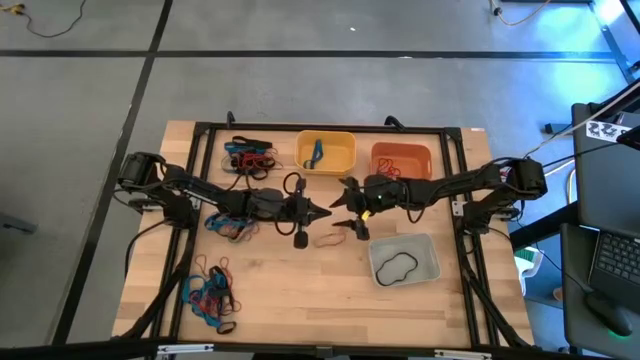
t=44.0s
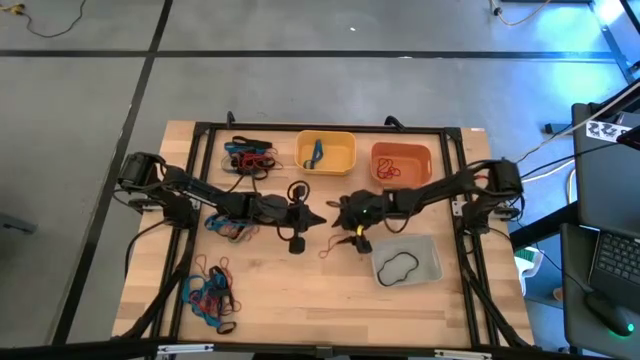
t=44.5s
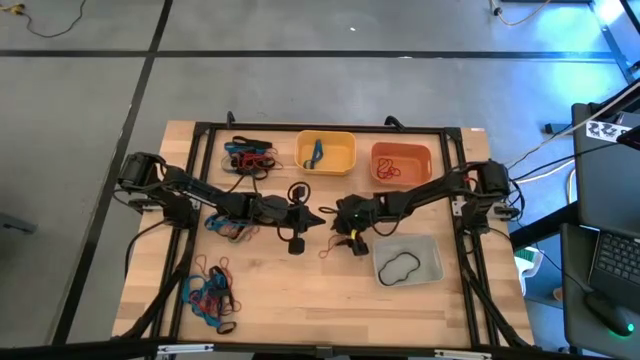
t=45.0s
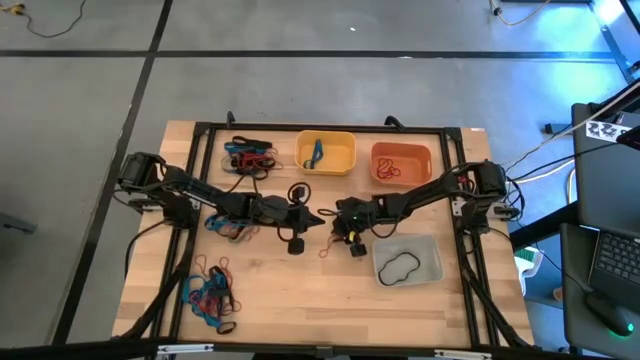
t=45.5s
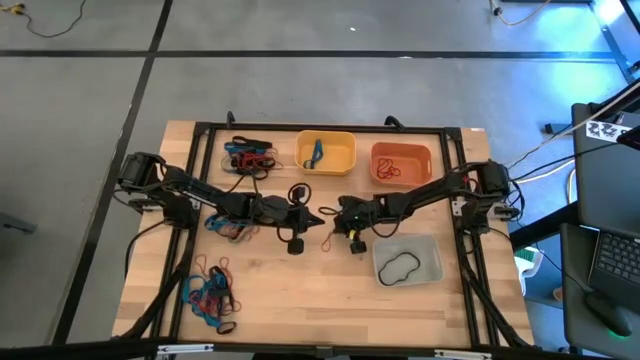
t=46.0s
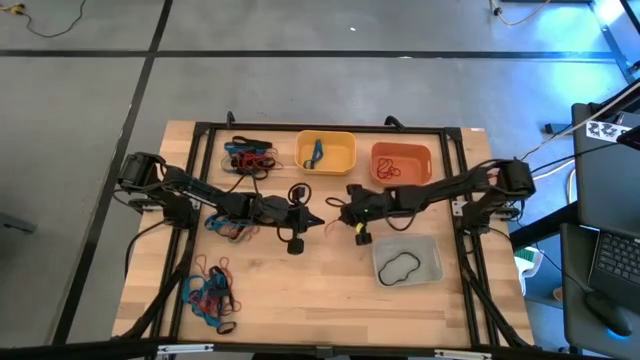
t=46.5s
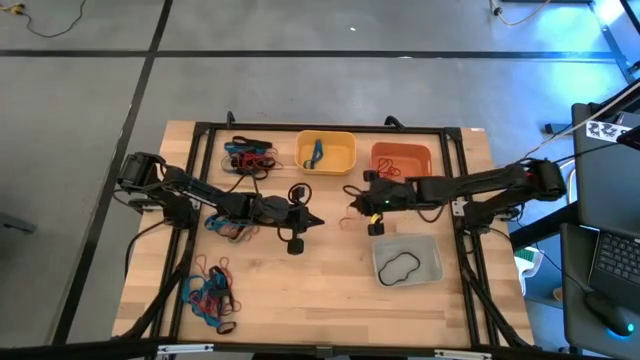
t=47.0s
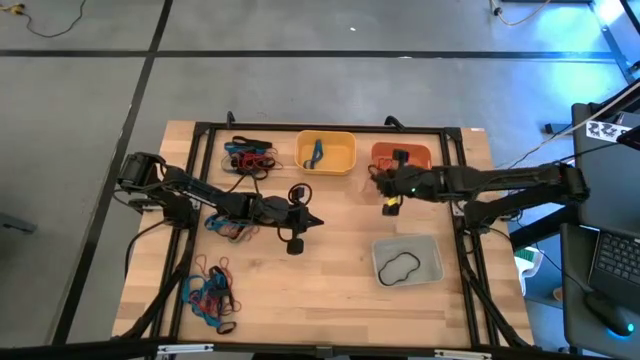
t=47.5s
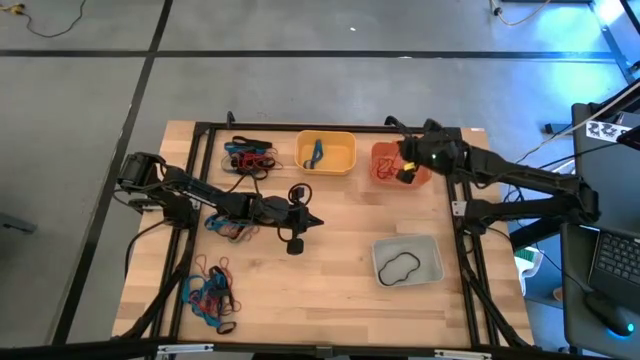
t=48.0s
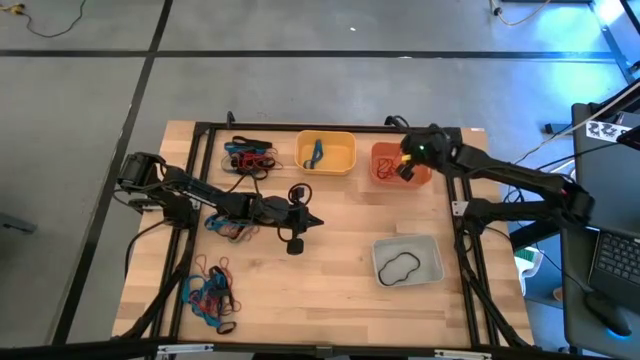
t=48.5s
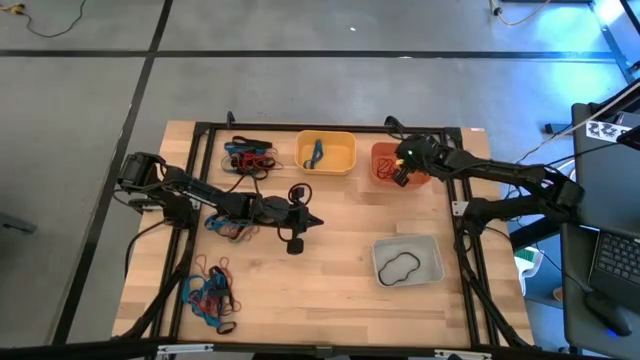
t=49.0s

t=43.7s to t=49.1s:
Task: Sort rubber bands into baskets
Put the red rubber band into the orange bin

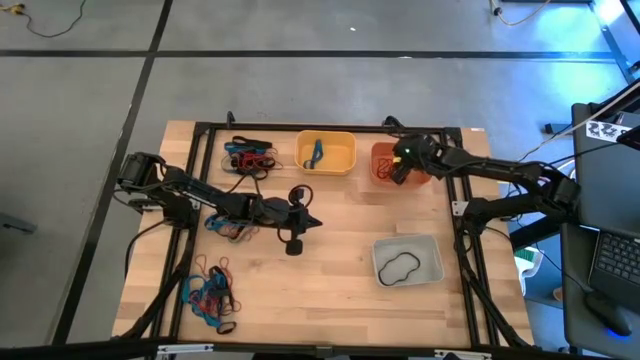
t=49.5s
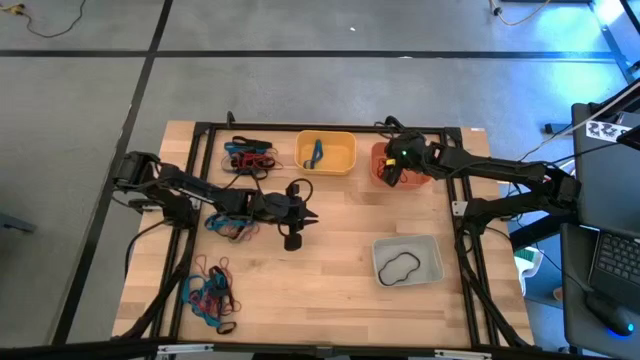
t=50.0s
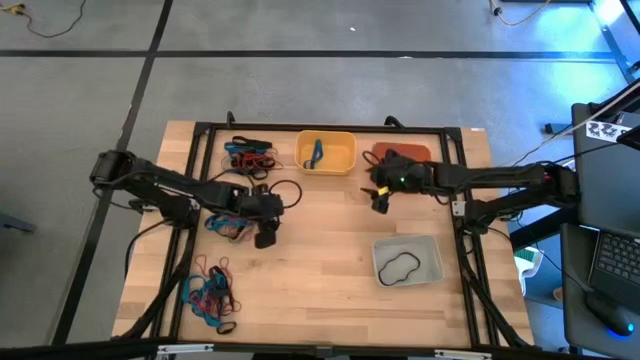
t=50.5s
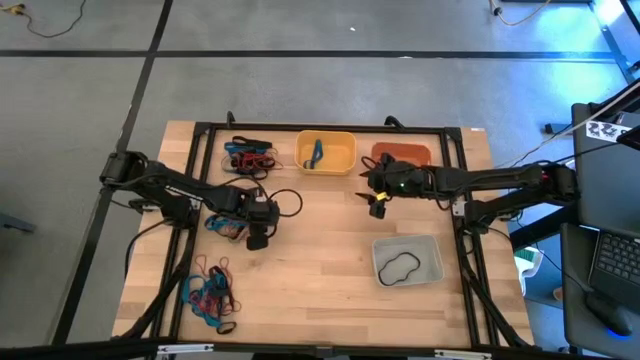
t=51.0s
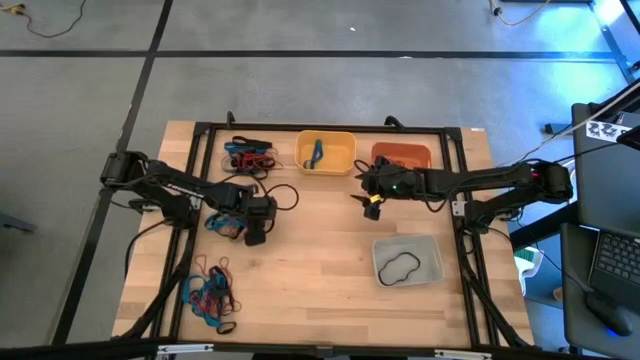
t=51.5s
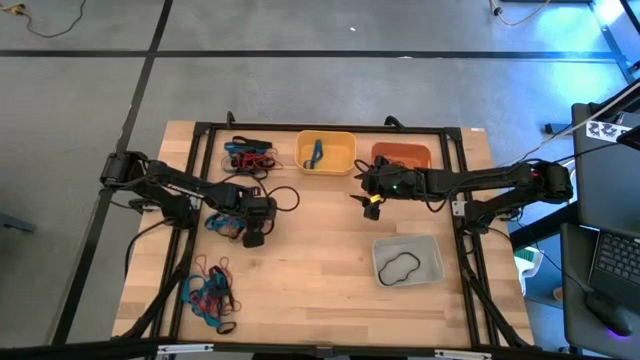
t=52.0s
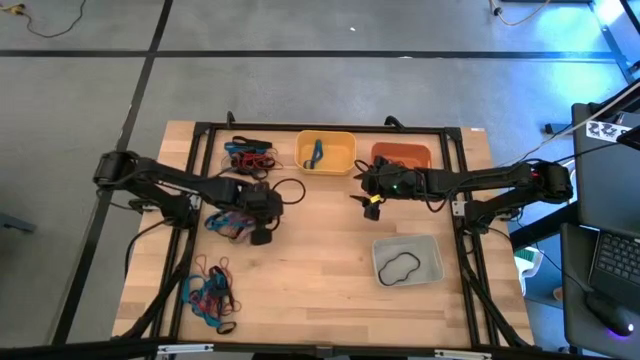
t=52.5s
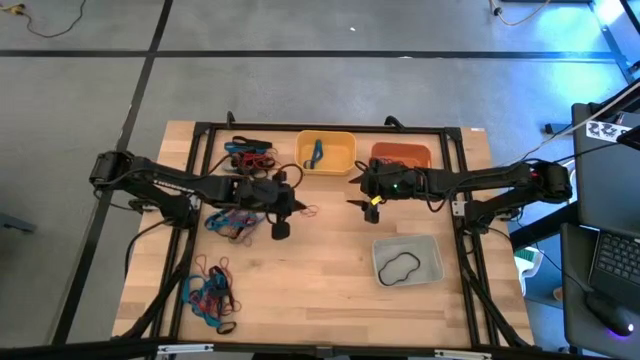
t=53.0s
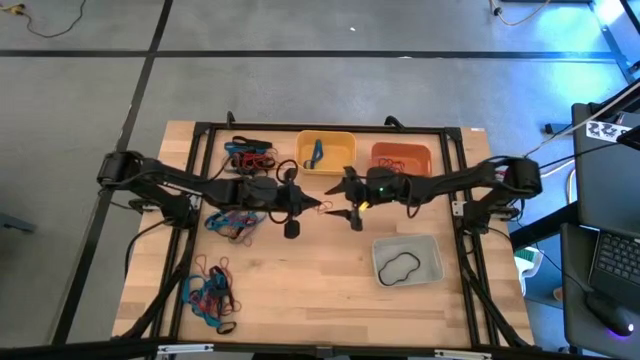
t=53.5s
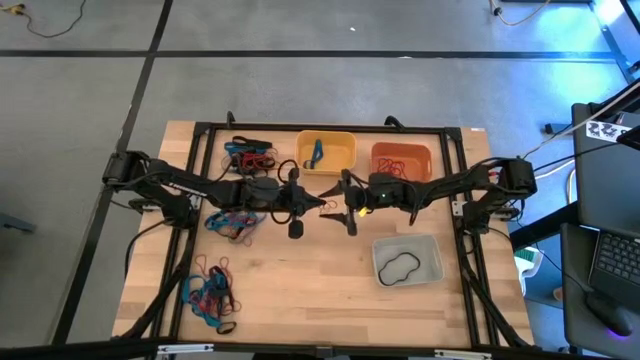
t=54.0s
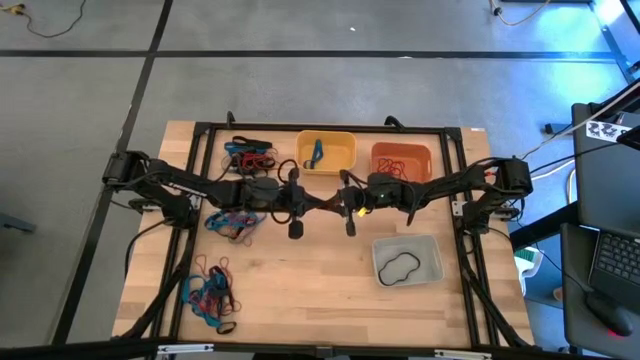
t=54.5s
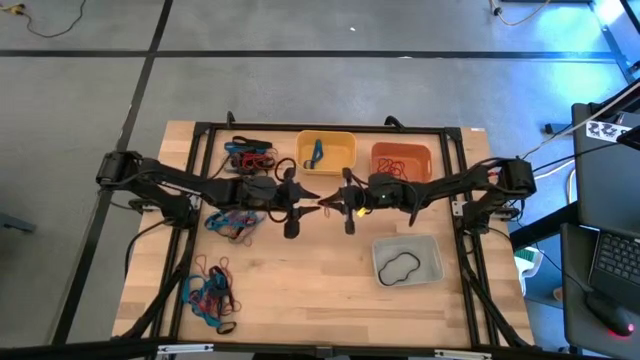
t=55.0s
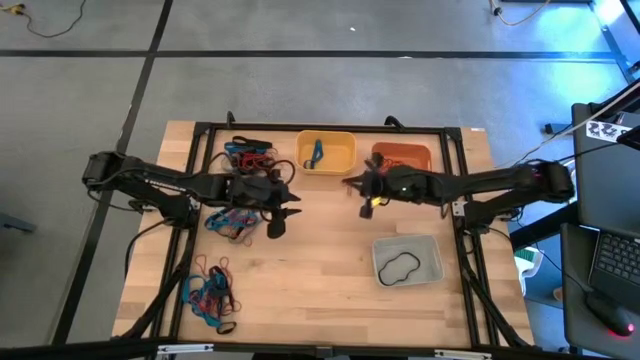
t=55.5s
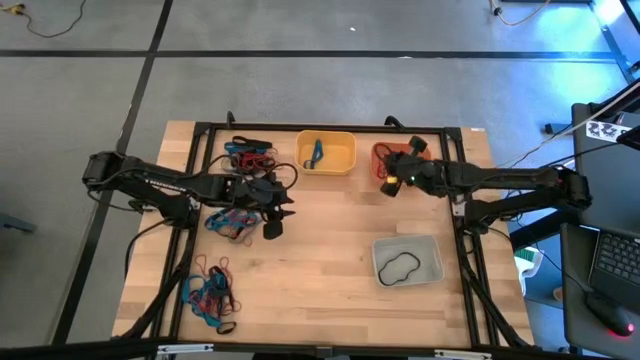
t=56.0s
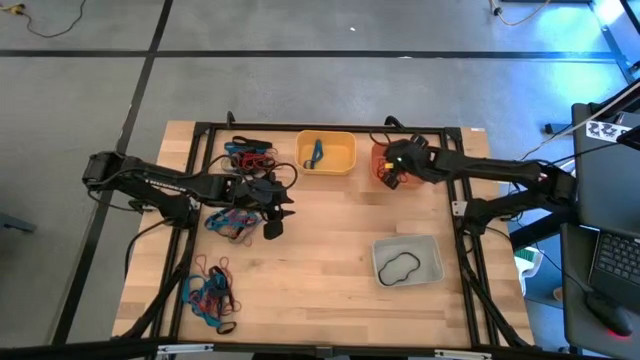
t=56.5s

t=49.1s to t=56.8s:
Put the red rubber band into the orange bin

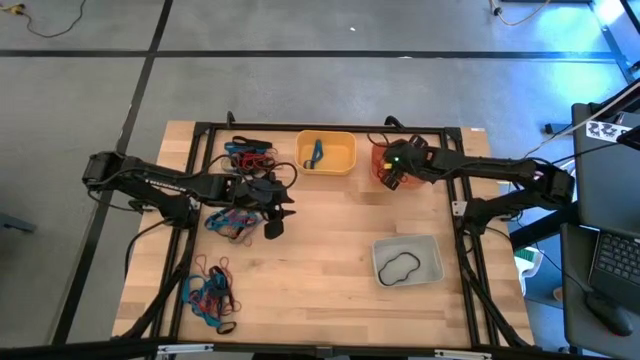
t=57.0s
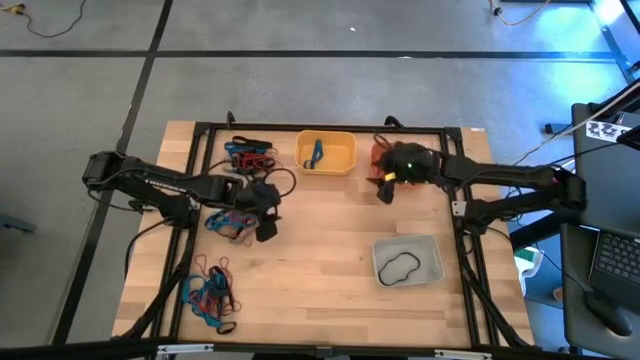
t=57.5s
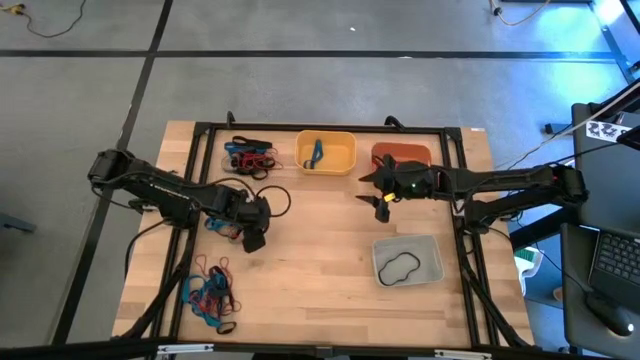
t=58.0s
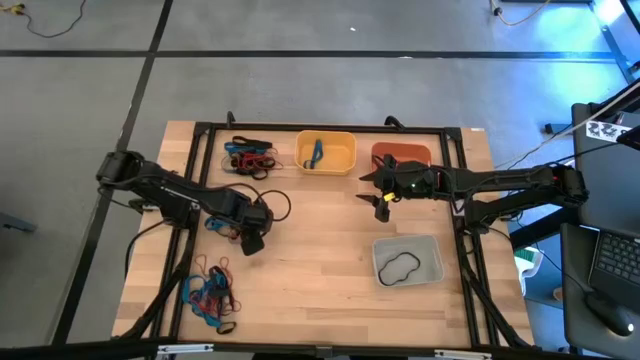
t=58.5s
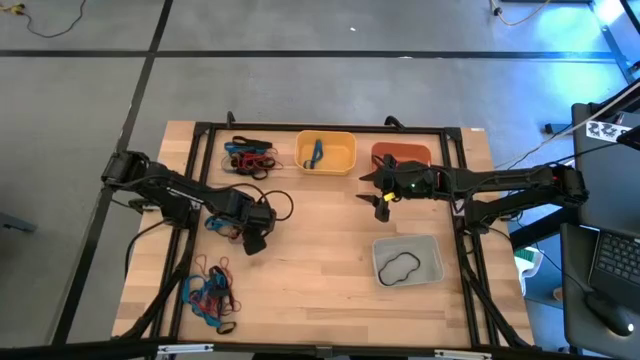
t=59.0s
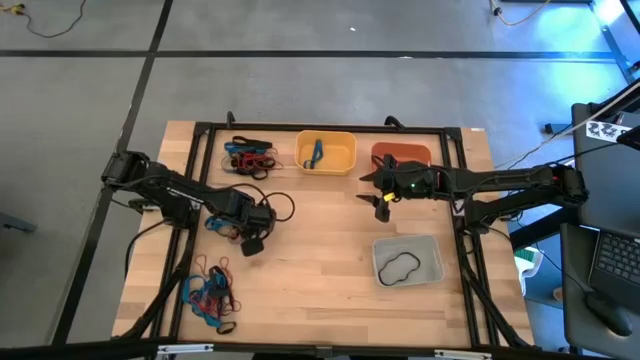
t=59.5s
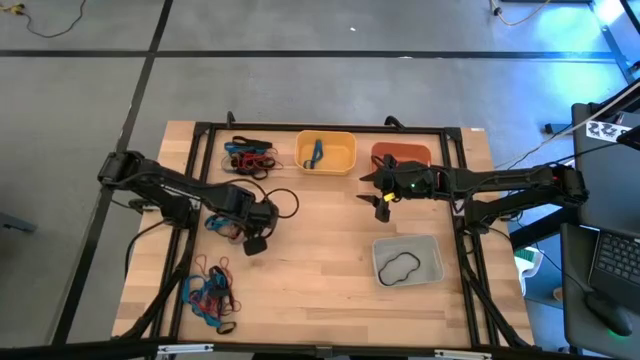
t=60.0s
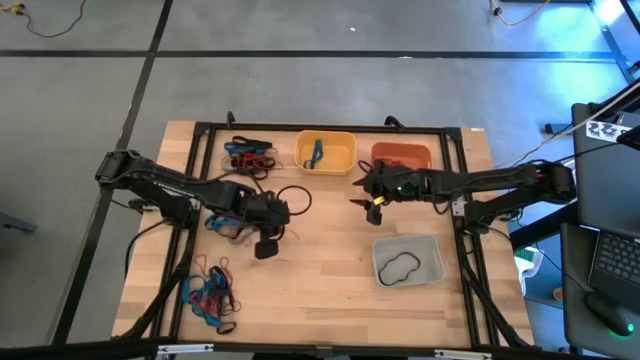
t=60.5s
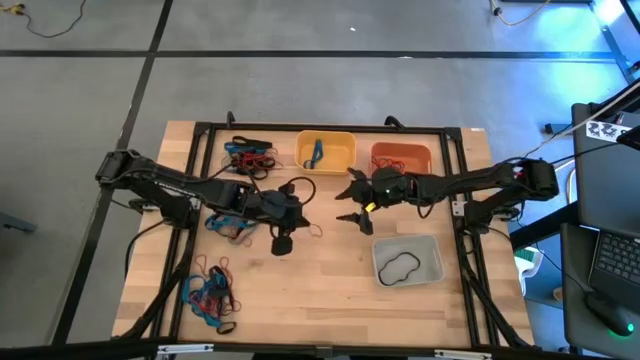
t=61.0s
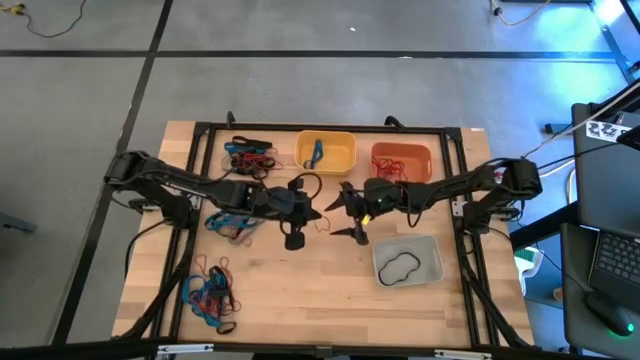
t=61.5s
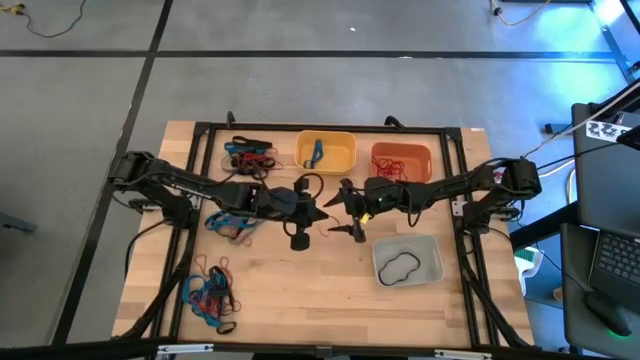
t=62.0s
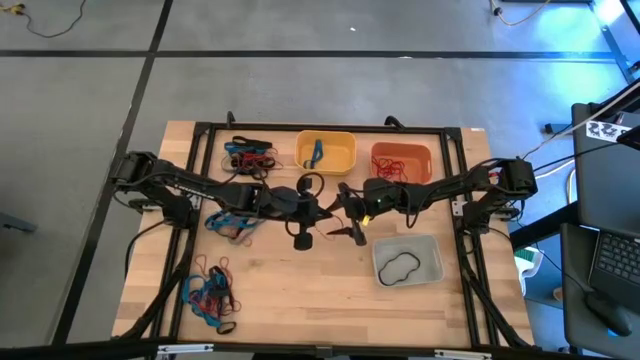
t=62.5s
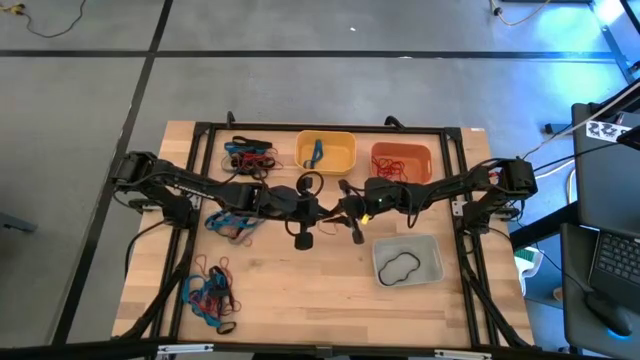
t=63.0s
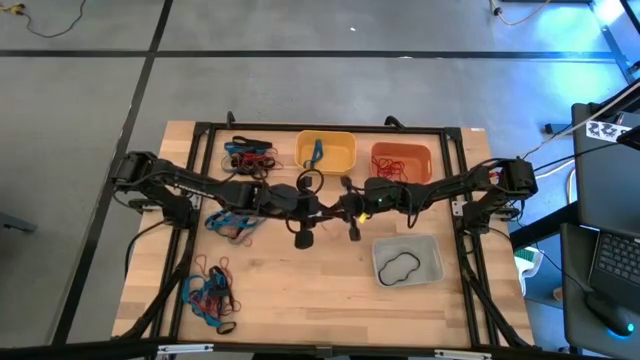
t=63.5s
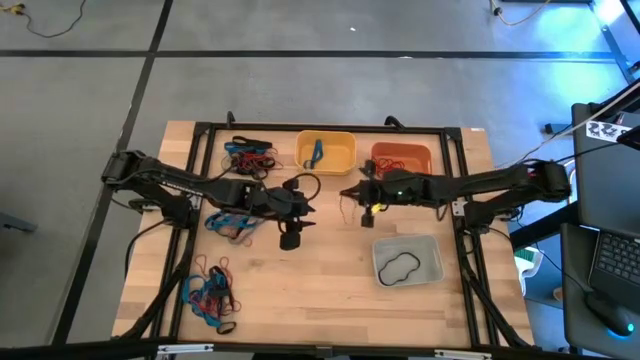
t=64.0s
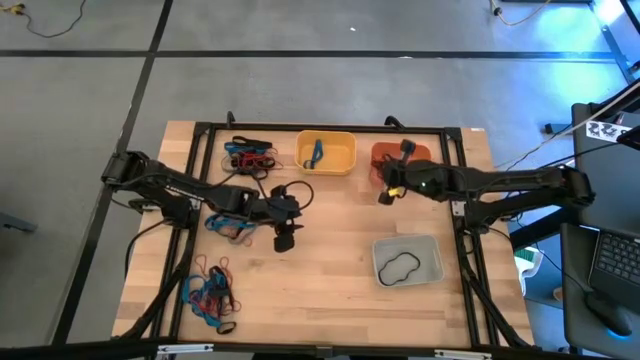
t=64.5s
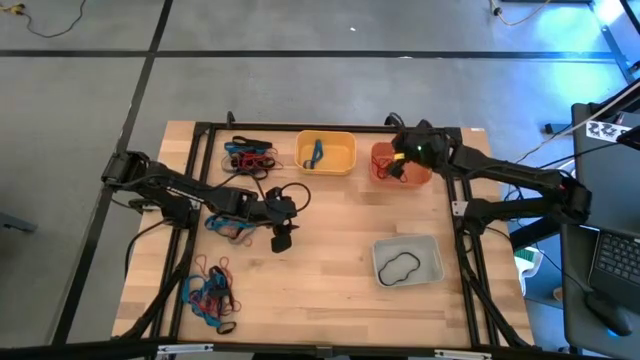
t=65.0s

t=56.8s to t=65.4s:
Put the red rubber band into the orange bin
